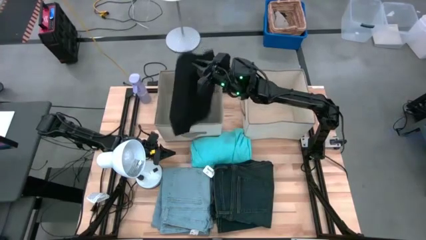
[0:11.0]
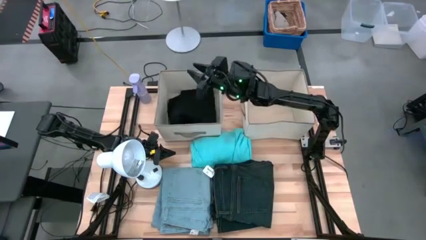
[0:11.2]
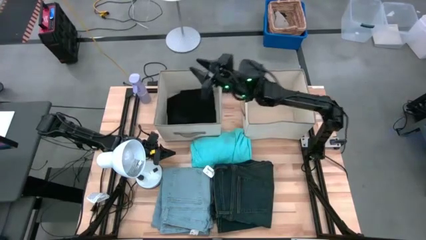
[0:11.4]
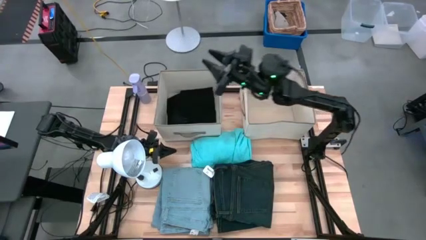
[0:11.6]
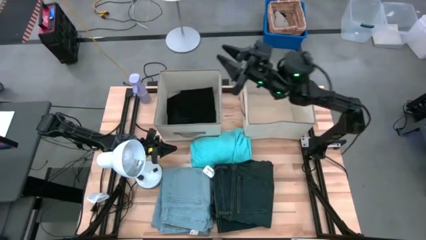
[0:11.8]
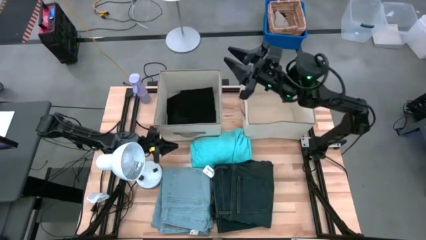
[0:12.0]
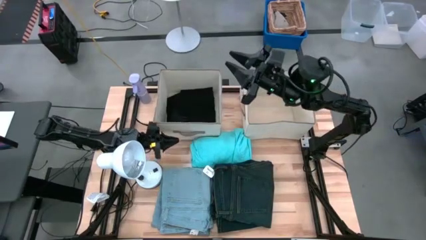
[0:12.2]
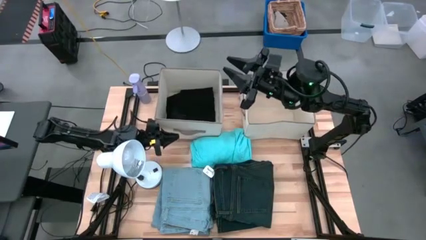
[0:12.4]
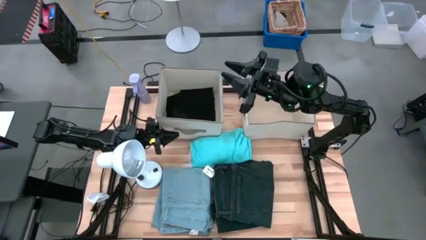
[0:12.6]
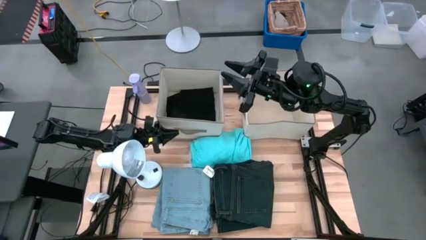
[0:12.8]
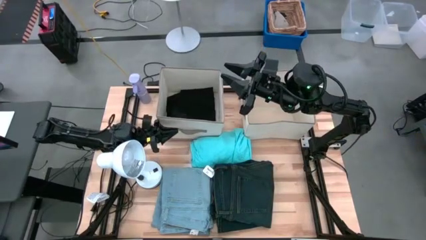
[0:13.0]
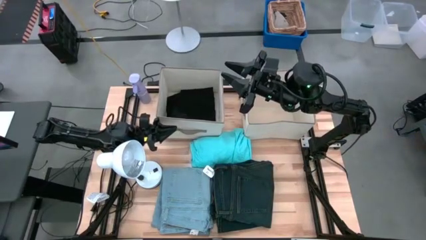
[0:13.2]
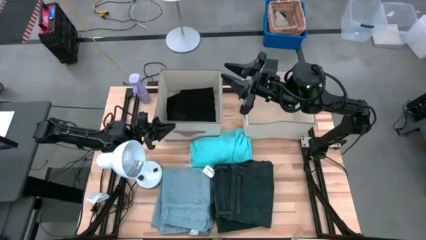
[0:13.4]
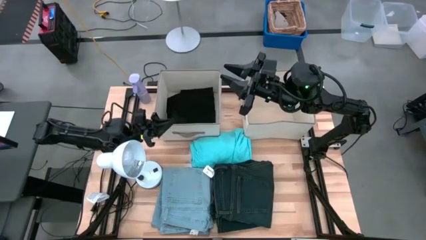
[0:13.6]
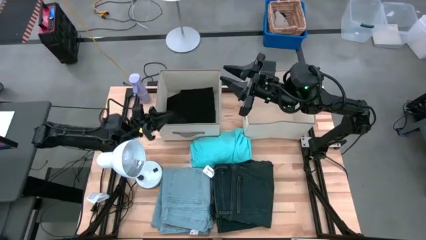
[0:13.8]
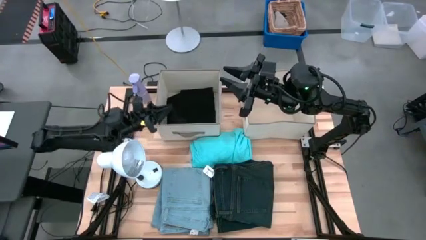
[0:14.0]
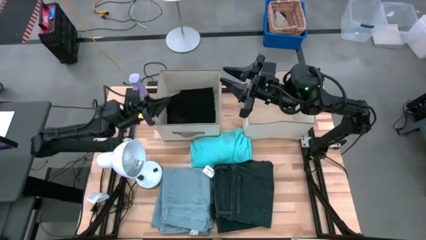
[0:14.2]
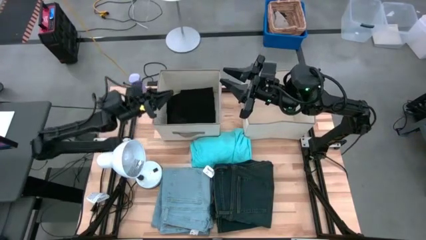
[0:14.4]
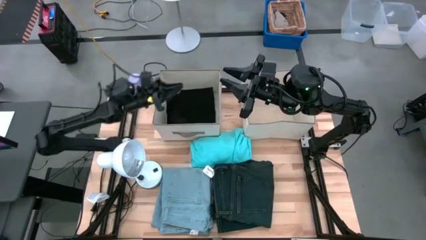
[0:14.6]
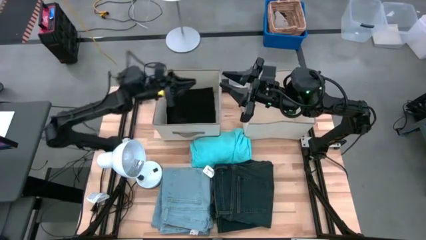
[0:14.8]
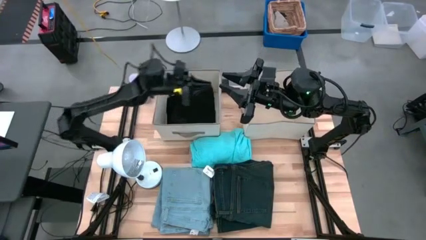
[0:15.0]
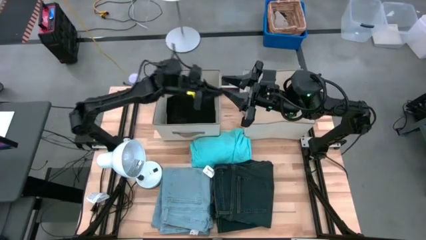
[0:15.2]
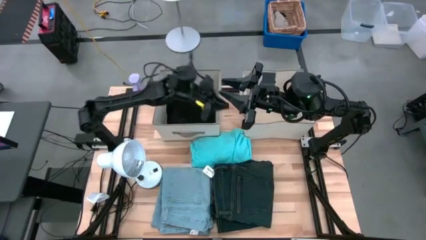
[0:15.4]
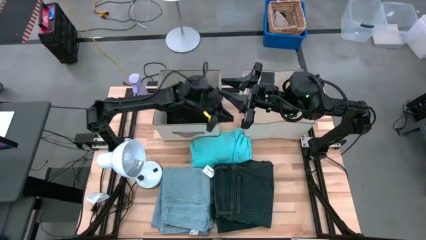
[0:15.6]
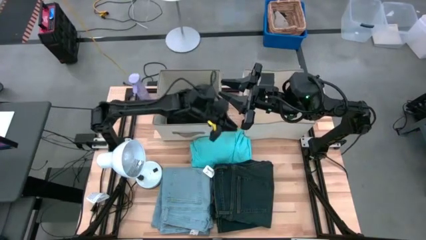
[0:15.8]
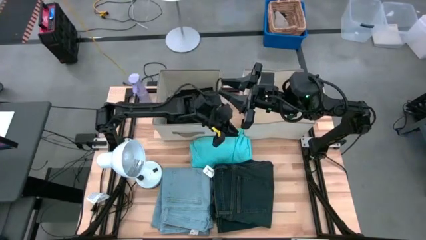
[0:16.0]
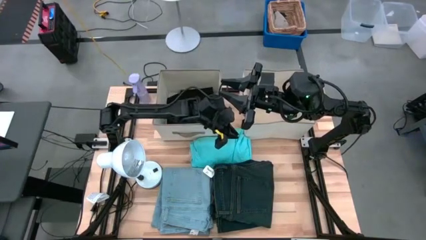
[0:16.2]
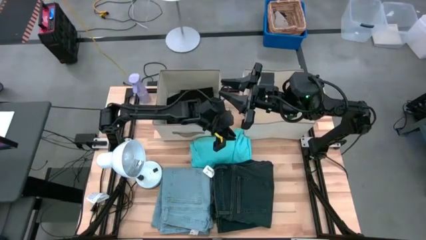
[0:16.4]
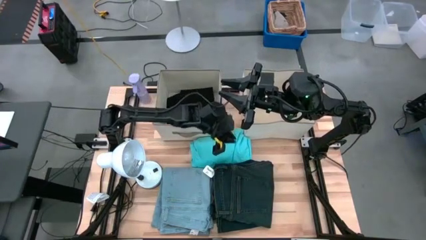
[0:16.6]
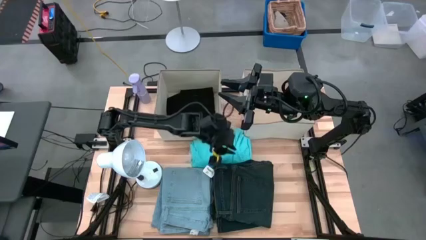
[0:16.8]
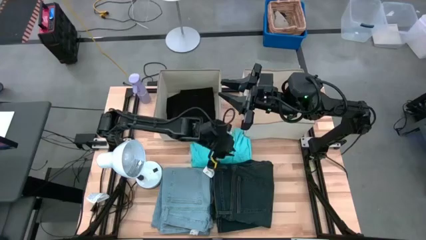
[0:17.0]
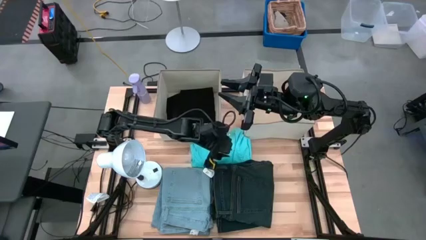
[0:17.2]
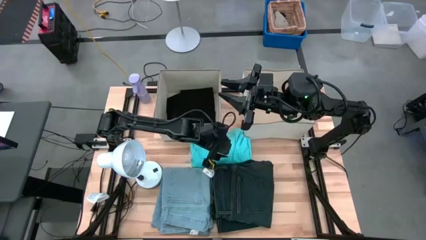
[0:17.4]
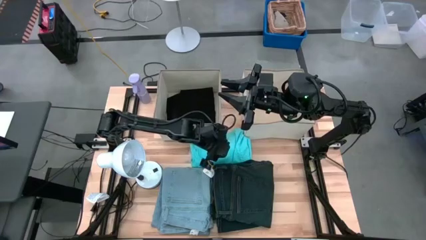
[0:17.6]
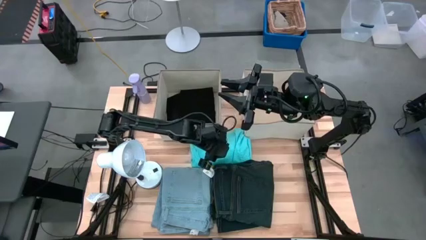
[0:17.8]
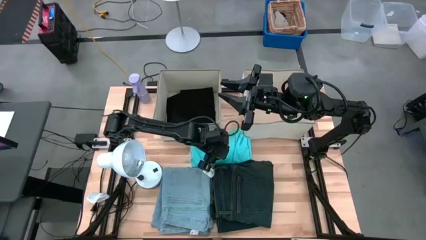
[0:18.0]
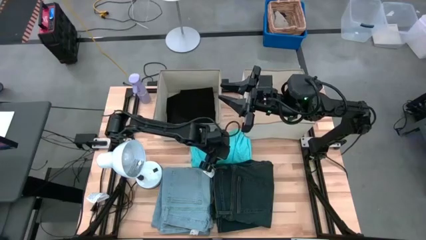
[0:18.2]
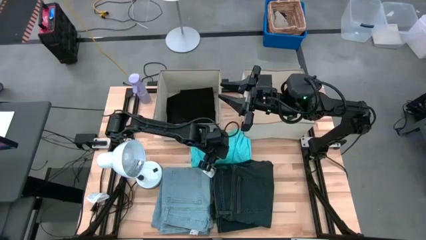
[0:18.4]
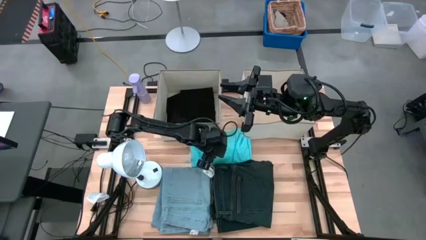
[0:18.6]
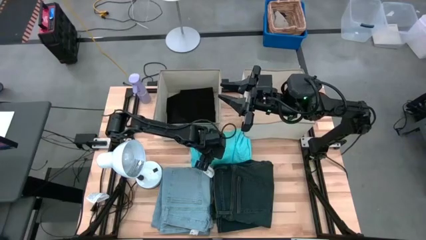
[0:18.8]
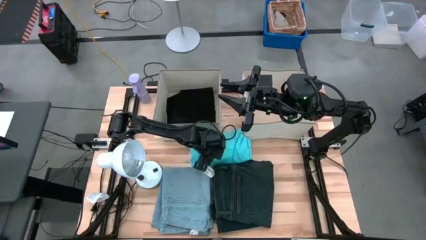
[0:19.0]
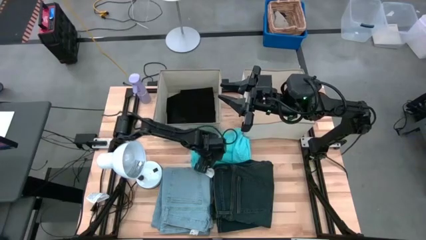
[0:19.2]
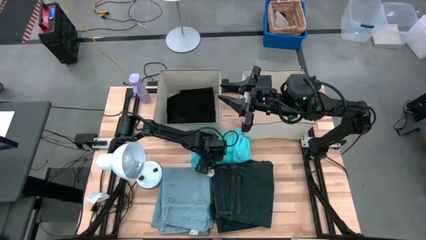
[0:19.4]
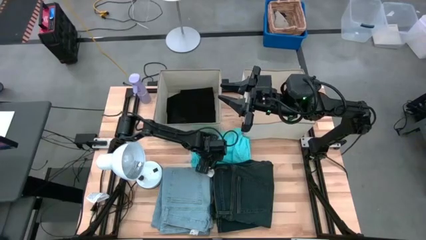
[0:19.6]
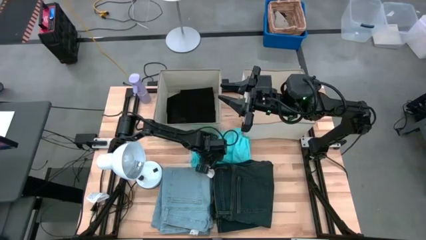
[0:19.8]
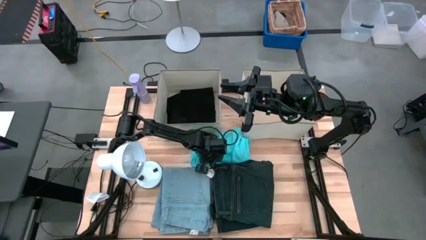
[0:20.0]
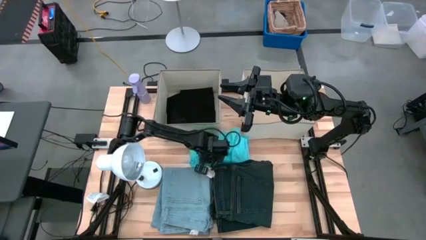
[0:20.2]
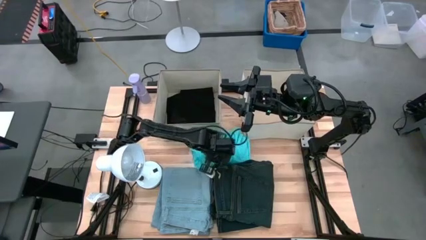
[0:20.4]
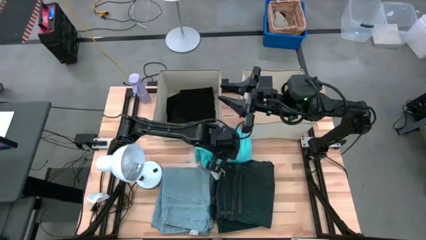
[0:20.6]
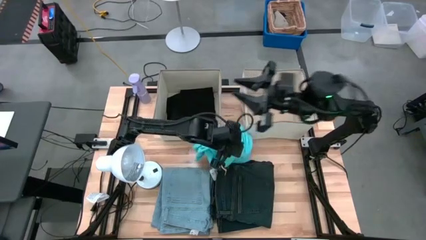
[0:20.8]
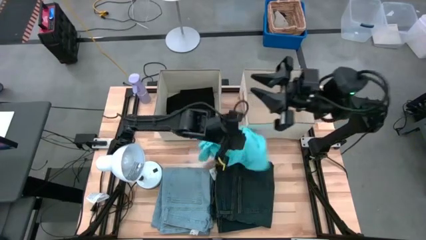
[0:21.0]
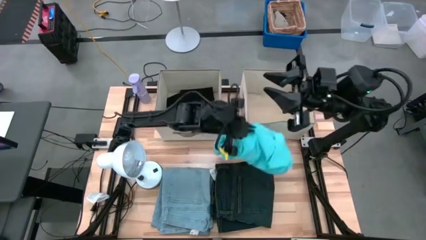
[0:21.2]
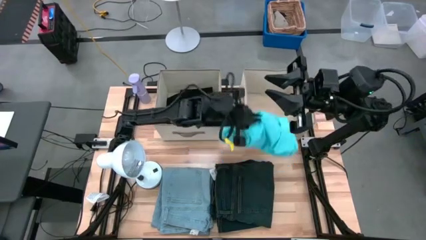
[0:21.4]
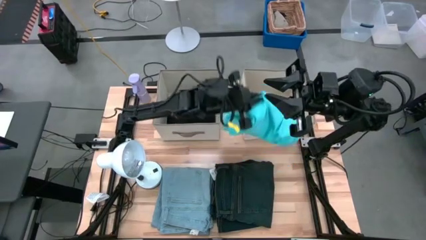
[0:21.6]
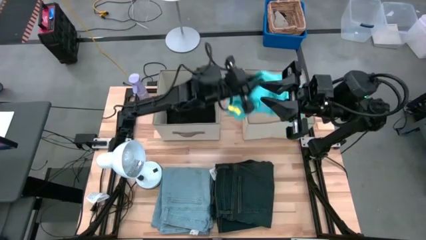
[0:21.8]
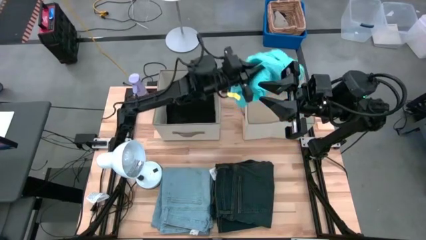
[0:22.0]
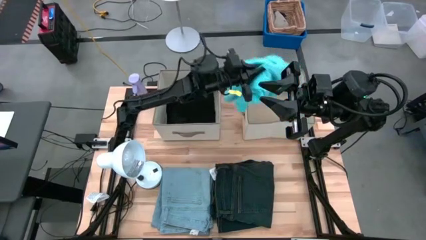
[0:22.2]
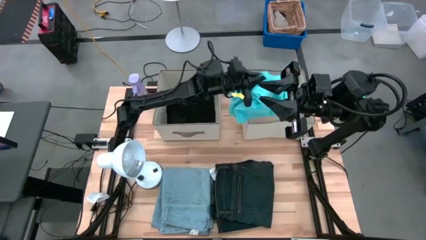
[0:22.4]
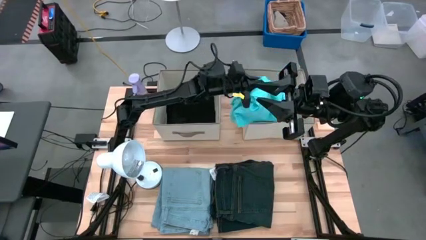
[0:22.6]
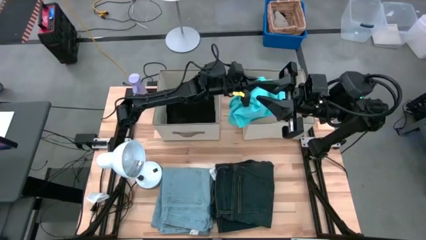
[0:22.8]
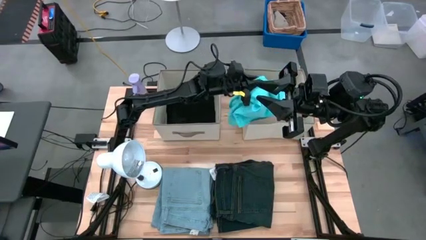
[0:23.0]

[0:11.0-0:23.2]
Task: Sort clothes
Put the light blue pants into the right laundry organizer

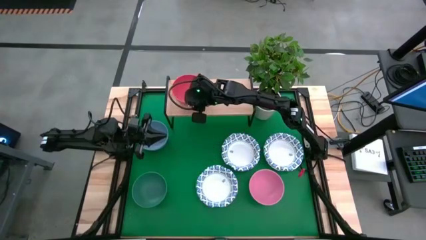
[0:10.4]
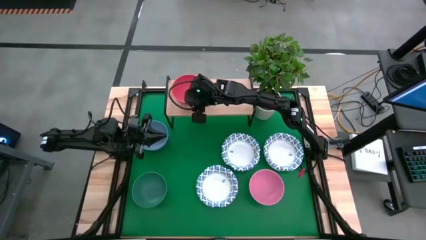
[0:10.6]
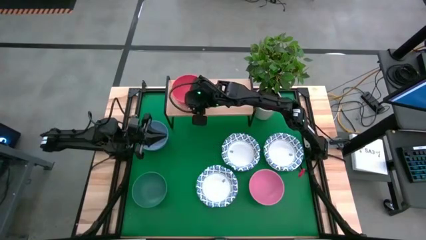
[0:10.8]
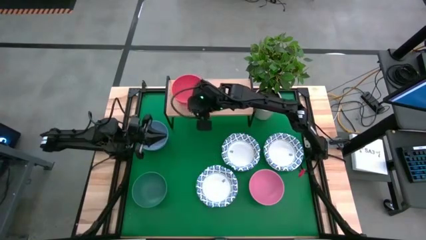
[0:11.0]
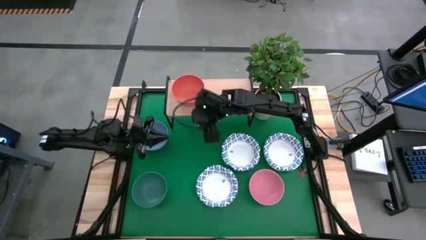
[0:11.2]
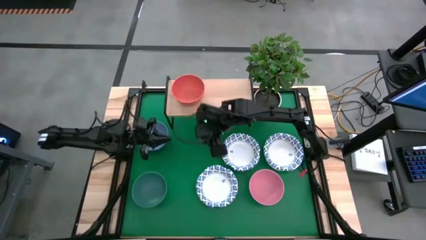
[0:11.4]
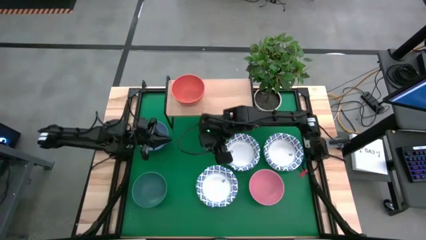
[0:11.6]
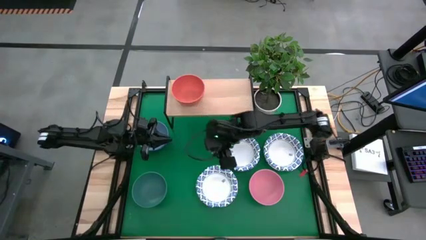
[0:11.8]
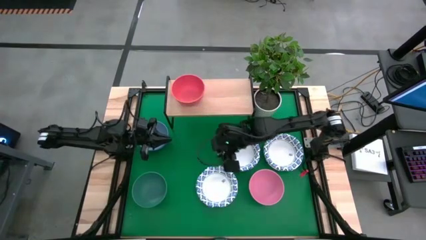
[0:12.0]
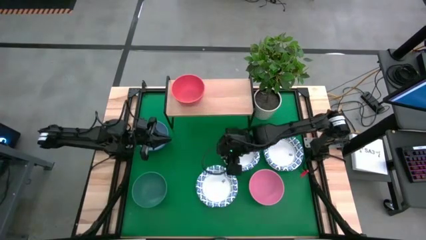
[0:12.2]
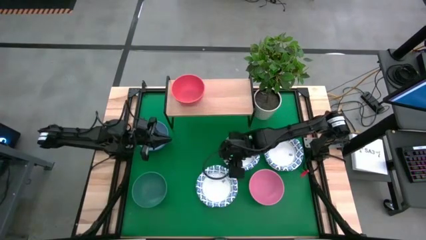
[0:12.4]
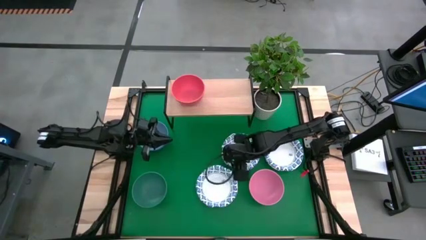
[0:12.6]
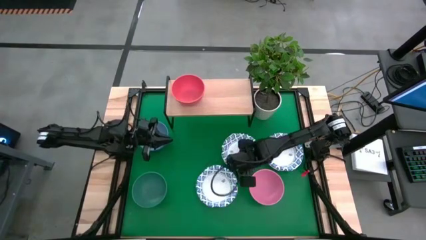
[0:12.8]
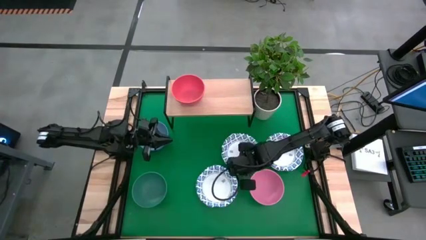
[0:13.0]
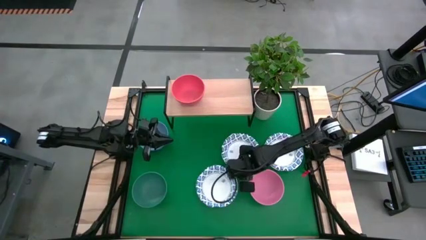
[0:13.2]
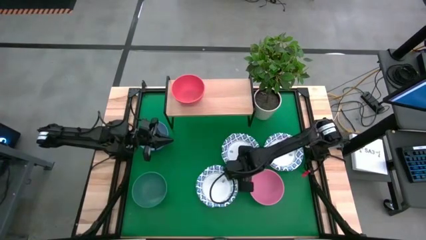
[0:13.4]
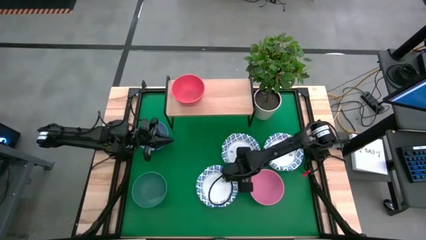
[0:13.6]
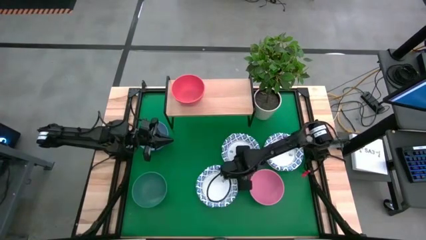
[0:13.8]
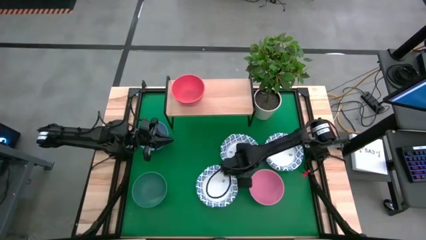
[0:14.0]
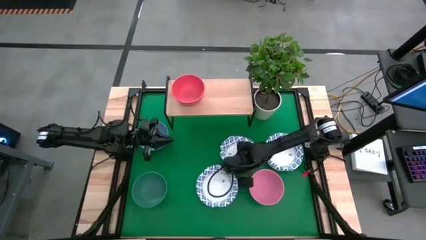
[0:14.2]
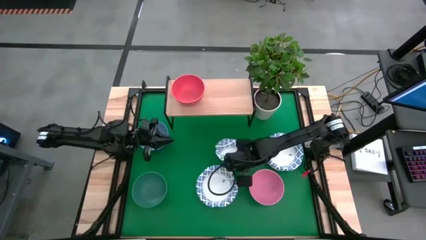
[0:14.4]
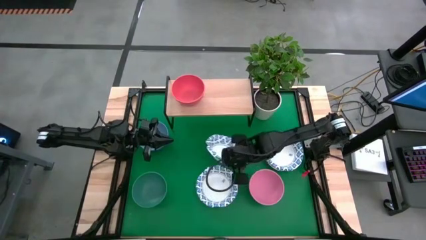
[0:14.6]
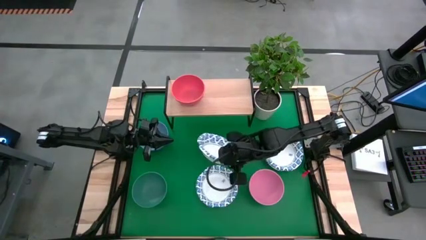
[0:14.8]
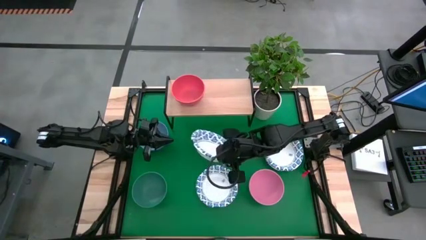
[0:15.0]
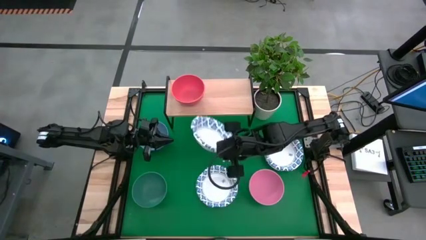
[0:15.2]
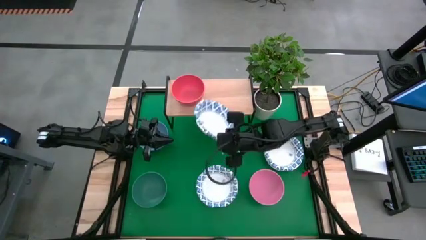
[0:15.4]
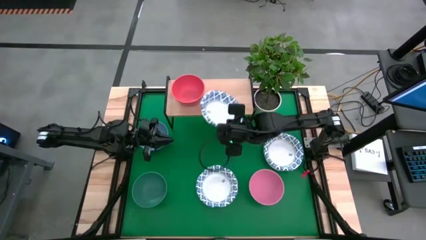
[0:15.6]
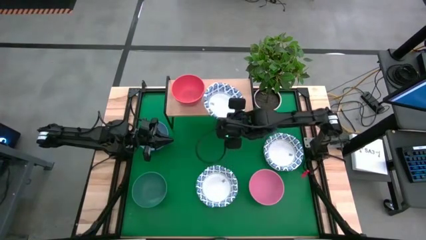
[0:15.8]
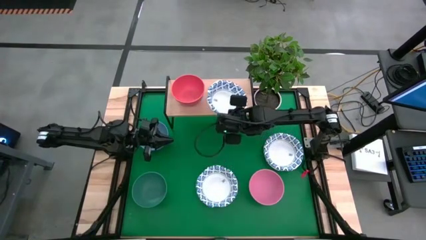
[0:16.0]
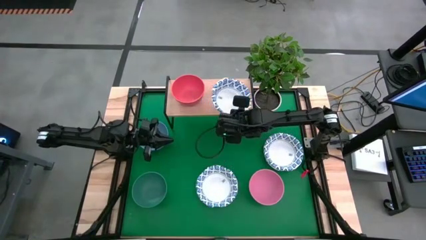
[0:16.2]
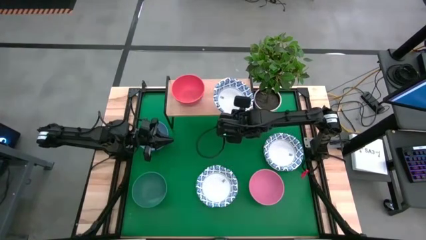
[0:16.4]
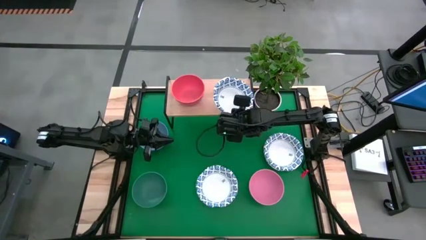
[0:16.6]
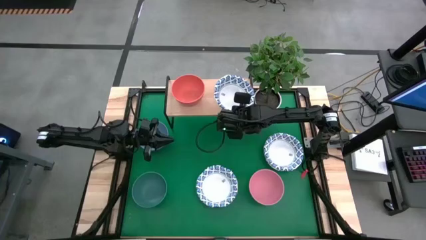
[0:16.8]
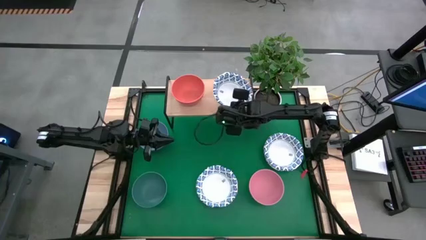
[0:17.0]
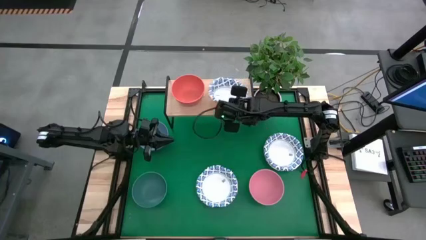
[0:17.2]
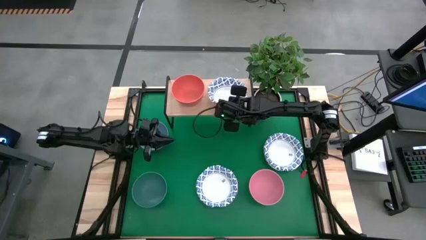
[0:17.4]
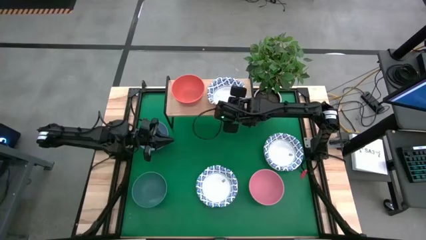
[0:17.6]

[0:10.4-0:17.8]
Task: Place and stack bowls onto a shelf
Put the top left white patterned bowl on the shelf
